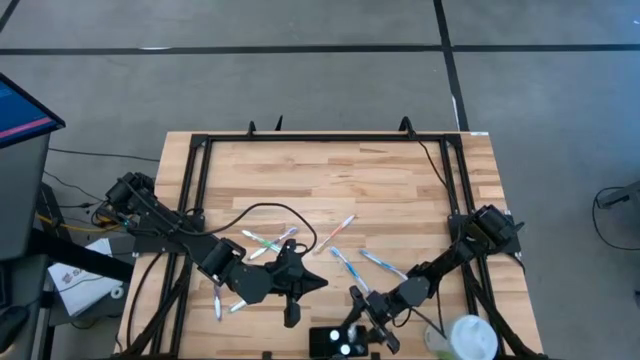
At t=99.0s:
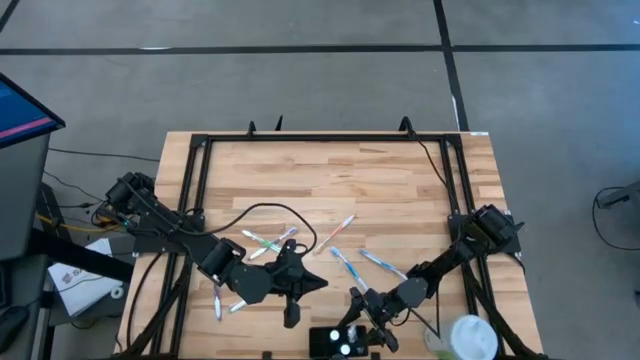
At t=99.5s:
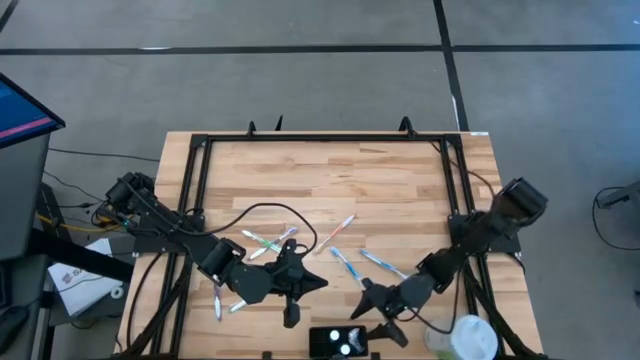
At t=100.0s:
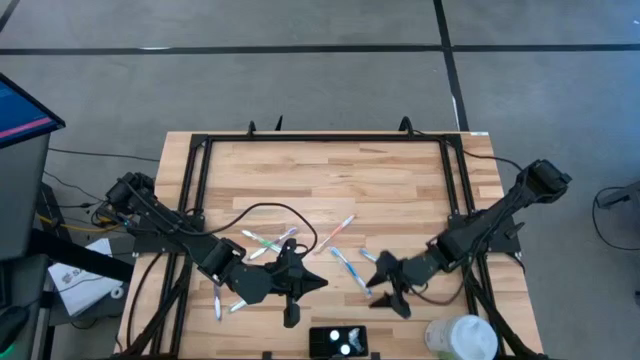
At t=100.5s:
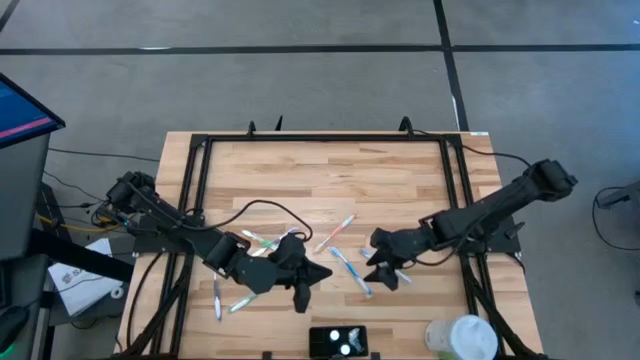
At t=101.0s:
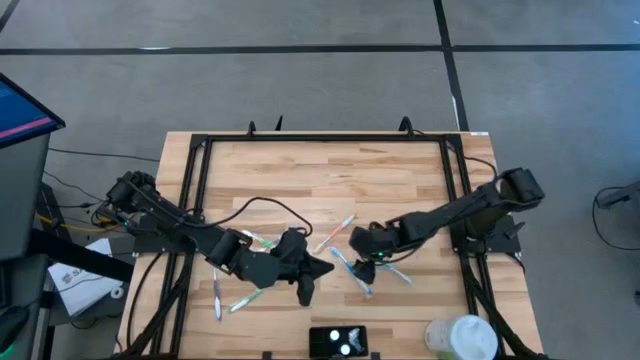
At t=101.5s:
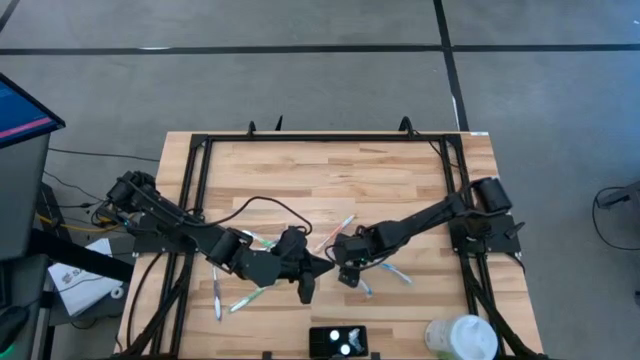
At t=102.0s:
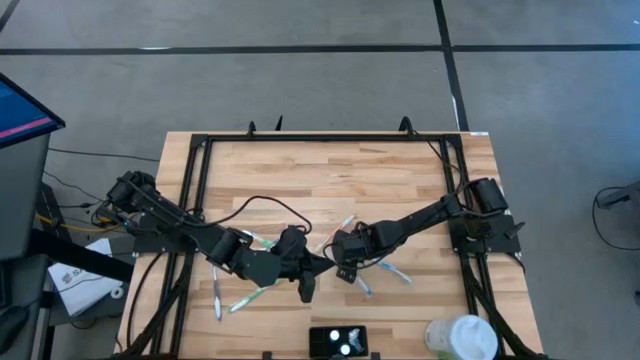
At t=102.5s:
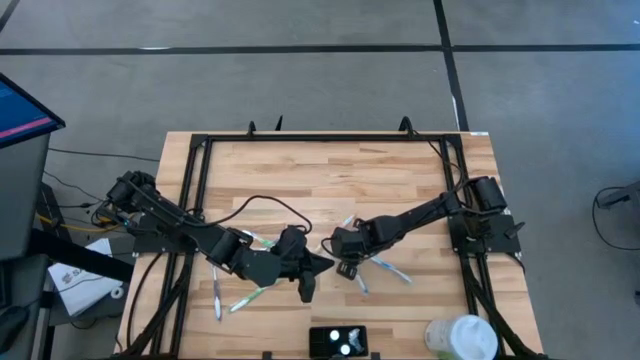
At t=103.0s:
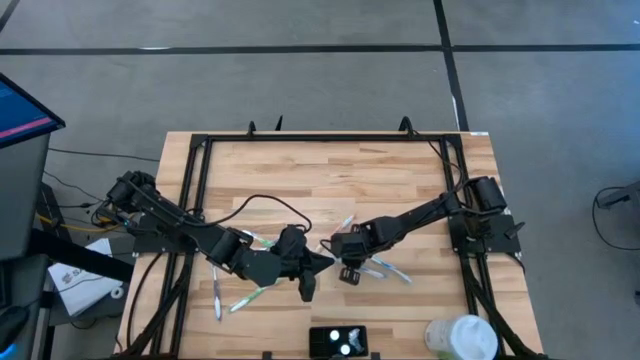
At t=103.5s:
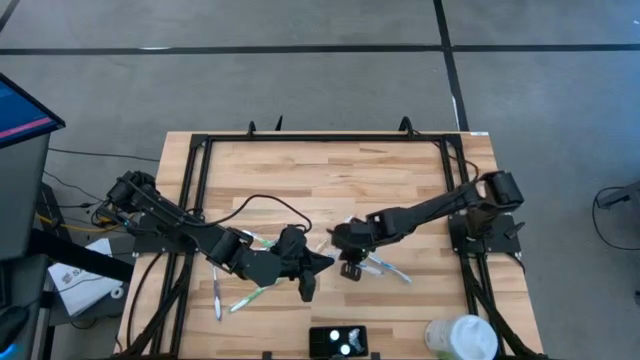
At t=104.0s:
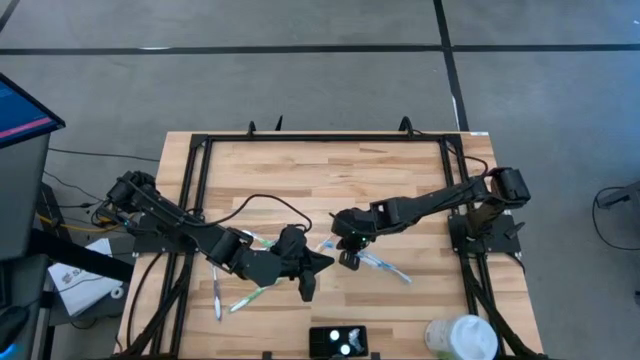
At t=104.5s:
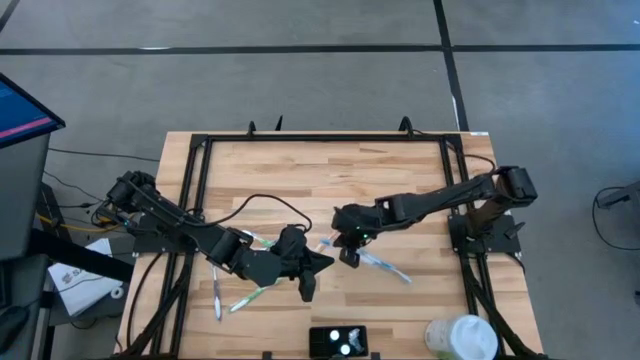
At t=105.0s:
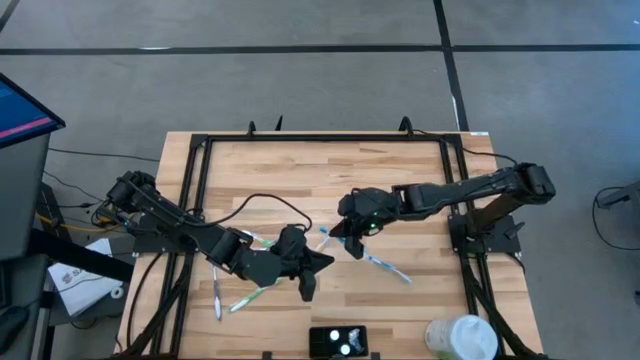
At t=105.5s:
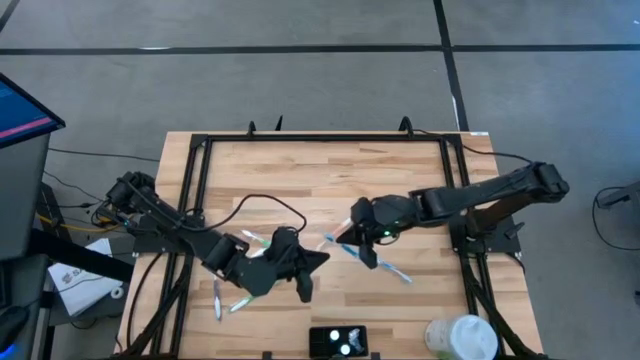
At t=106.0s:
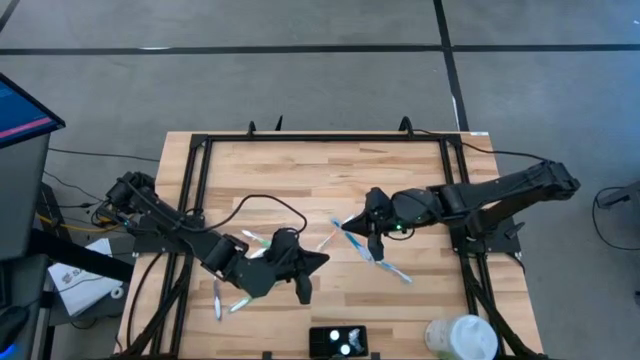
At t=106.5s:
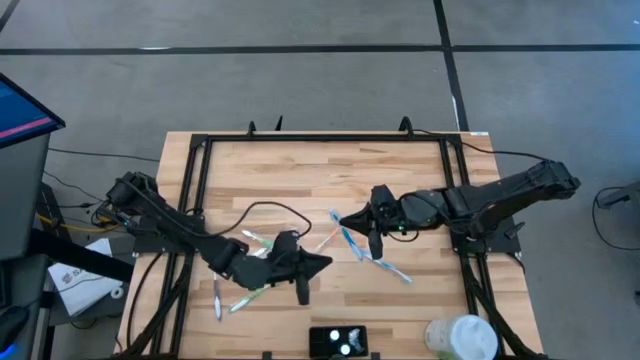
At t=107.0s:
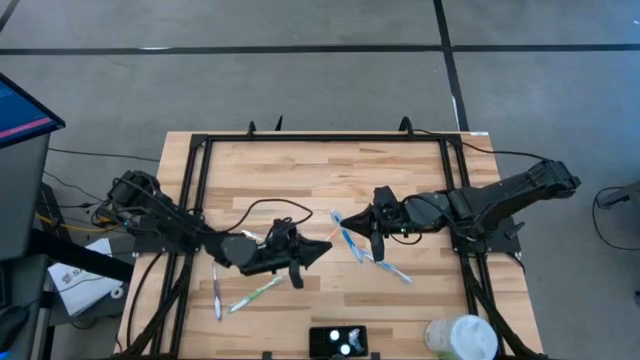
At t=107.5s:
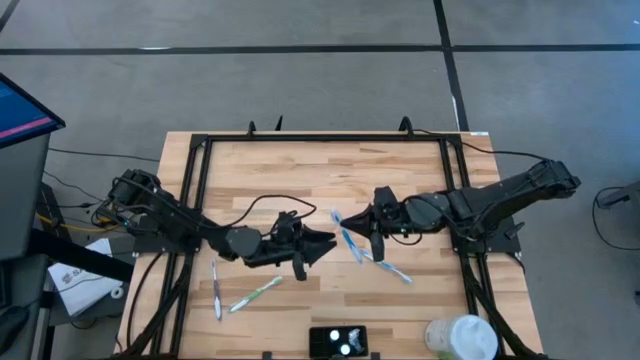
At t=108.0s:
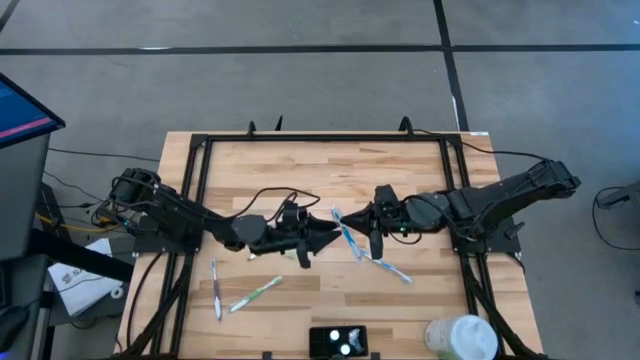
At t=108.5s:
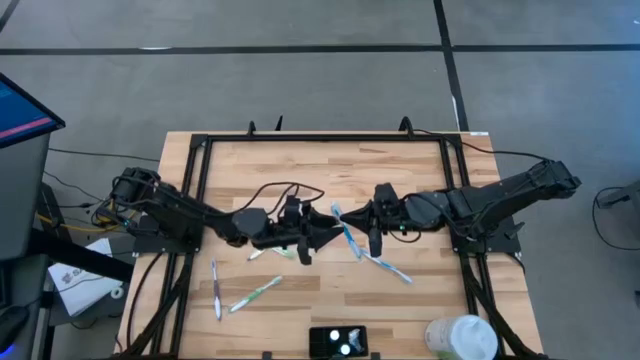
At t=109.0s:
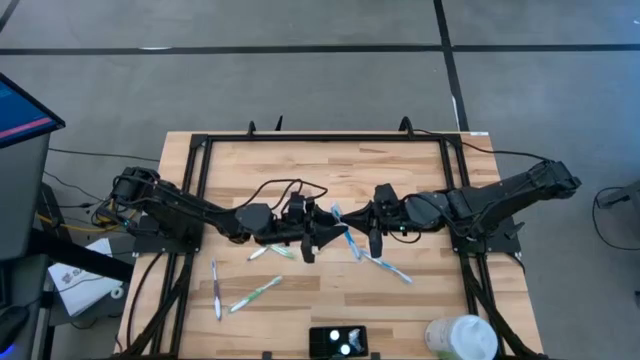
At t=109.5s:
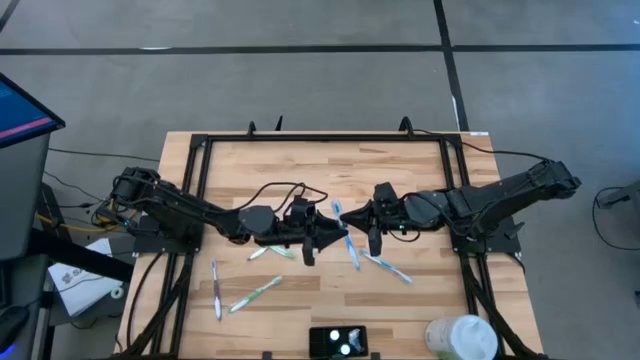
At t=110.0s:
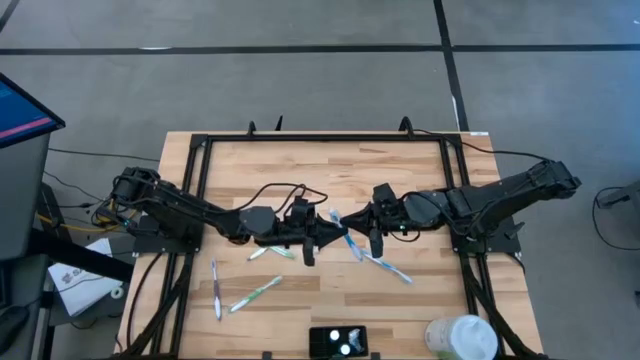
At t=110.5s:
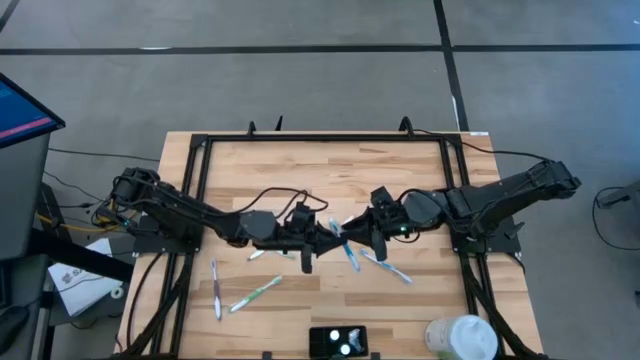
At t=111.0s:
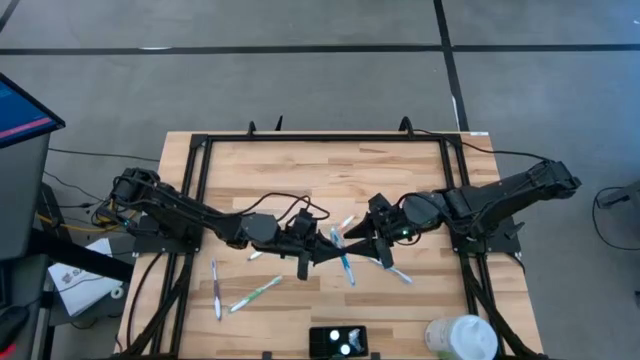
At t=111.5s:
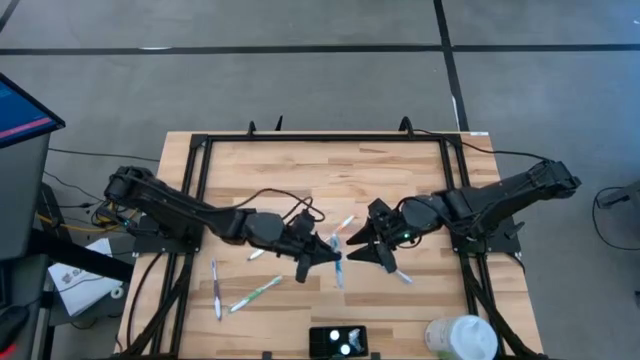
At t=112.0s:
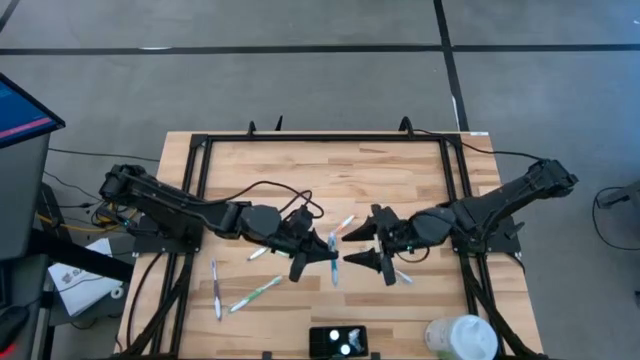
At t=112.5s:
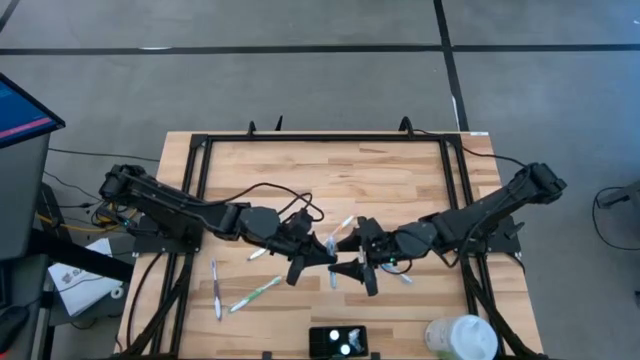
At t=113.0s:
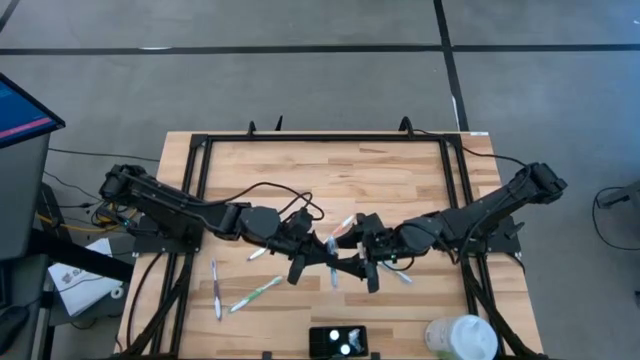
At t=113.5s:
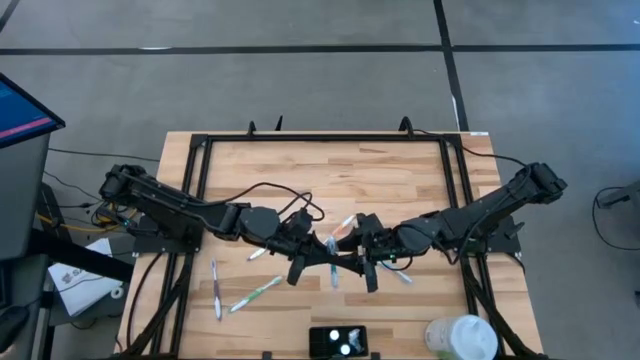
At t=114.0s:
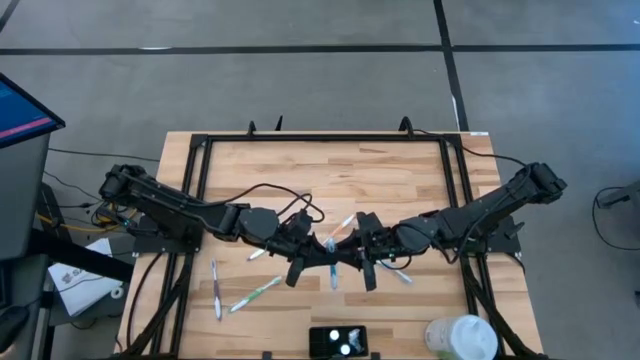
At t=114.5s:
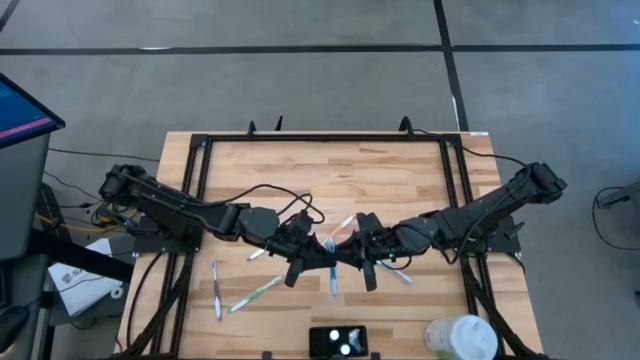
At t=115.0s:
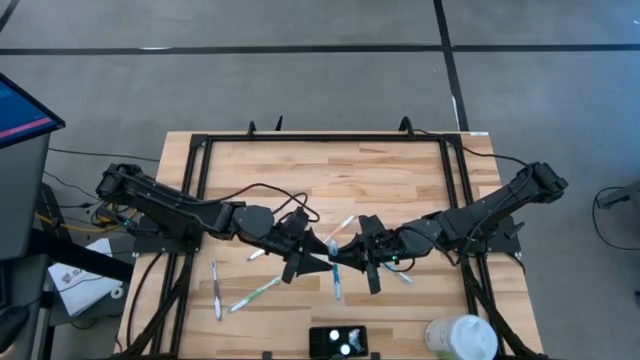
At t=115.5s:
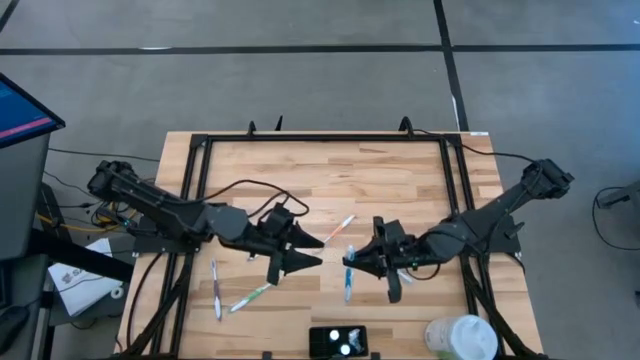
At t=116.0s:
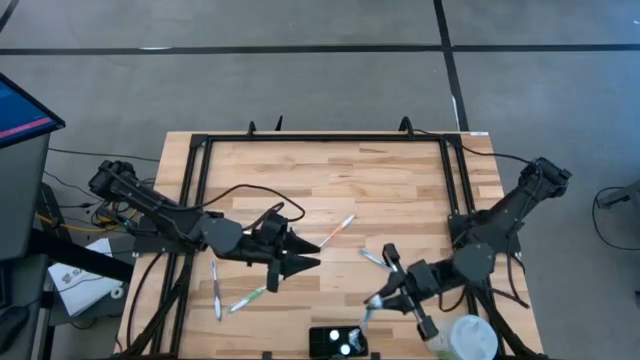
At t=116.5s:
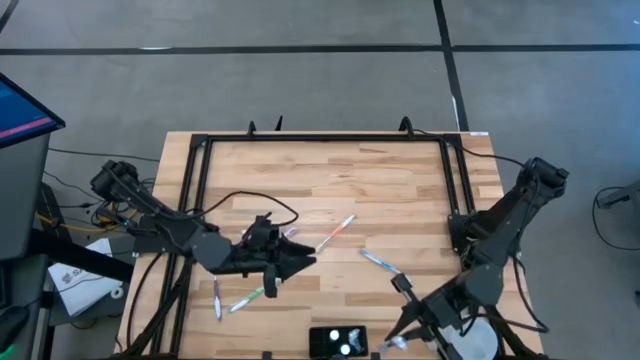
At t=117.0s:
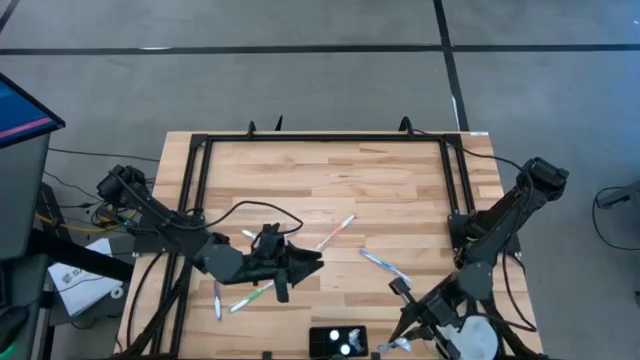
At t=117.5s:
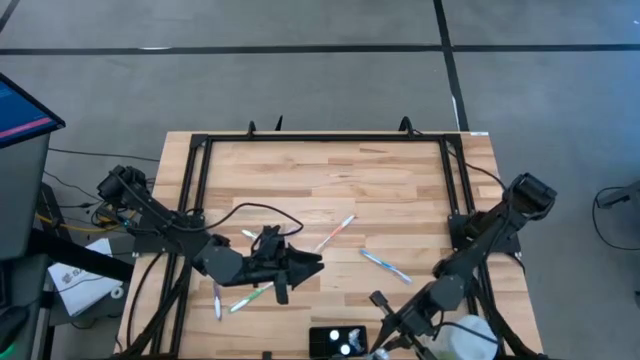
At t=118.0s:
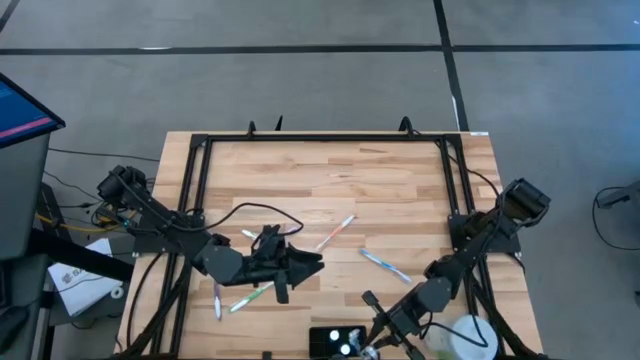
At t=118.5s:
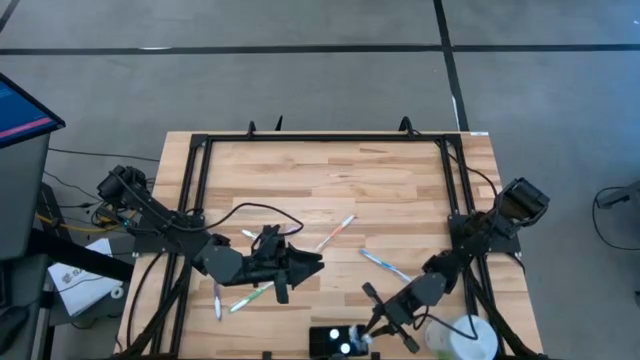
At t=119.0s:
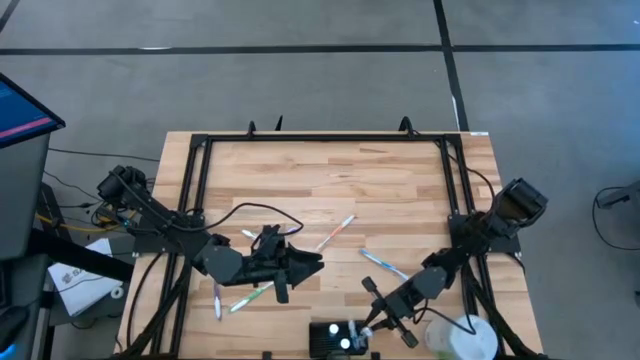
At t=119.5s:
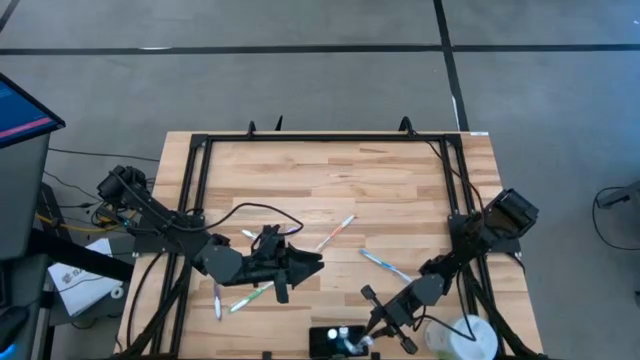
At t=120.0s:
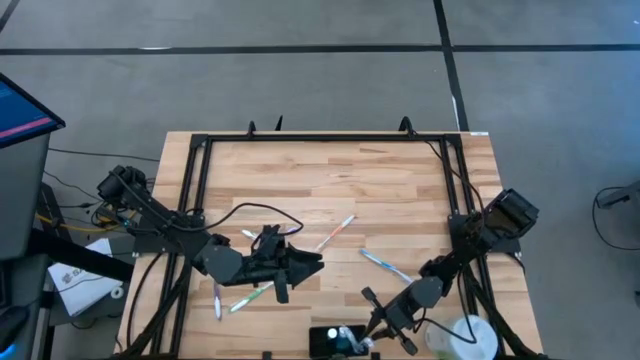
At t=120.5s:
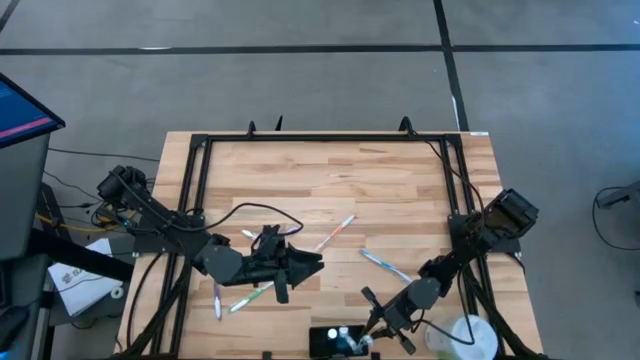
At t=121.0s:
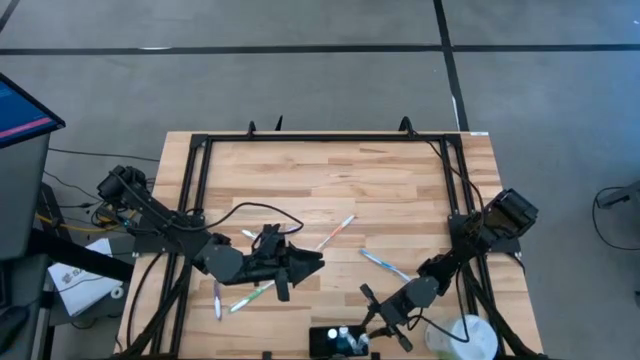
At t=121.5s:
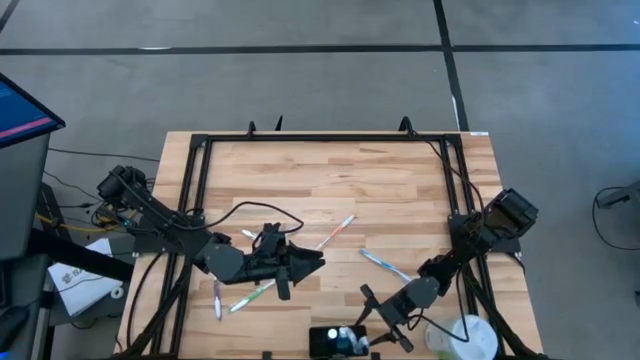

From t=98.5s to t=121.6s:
Task: Pick & Place toothbrushing station
Put the left blue toothbrush into the black mesh organizer
